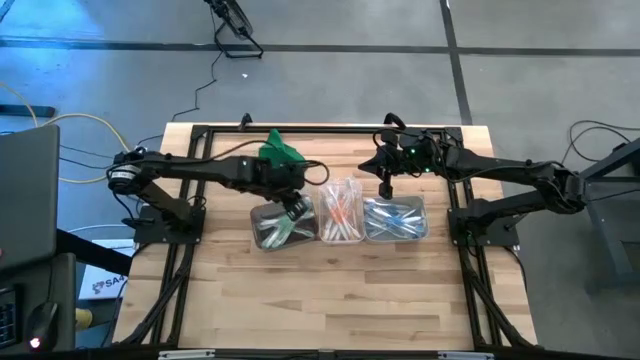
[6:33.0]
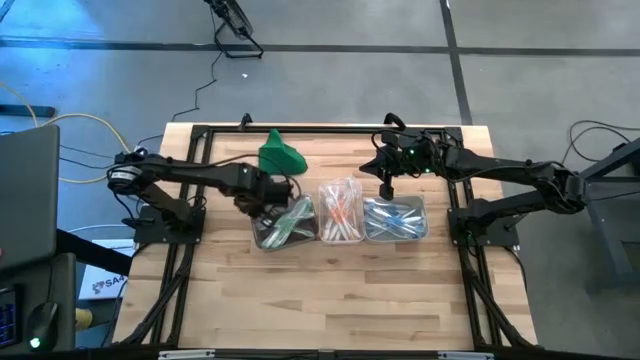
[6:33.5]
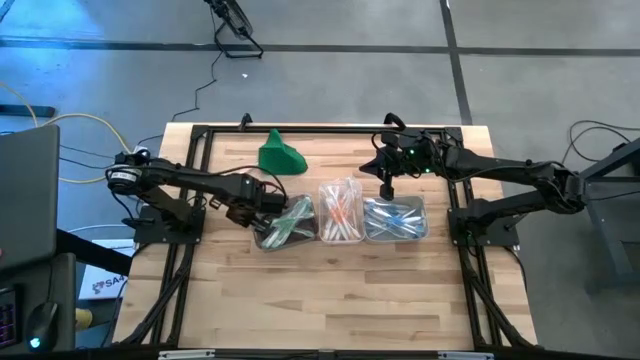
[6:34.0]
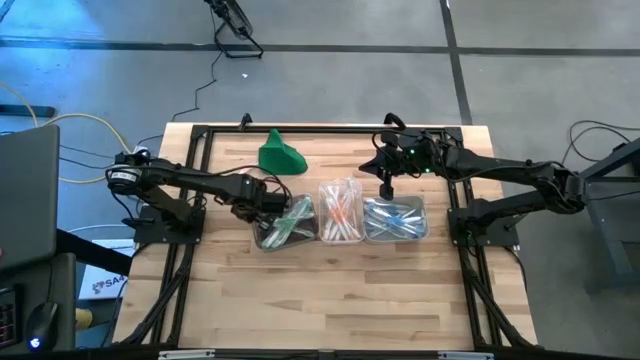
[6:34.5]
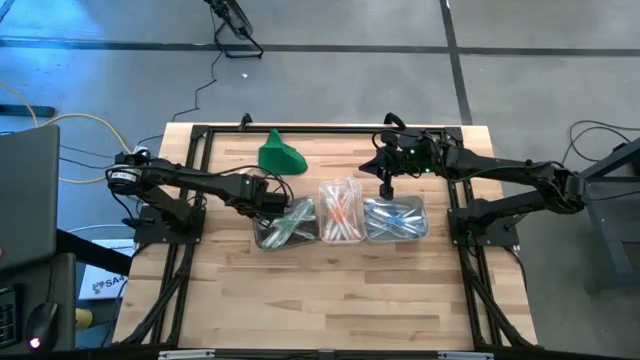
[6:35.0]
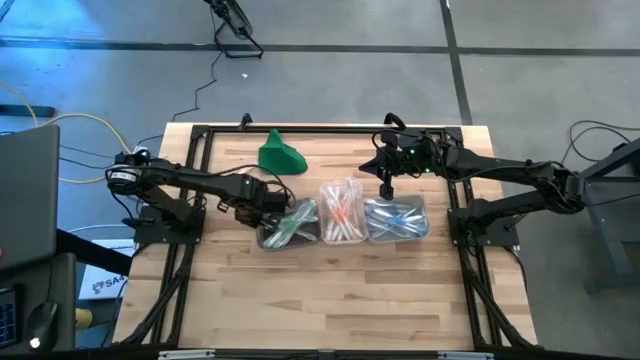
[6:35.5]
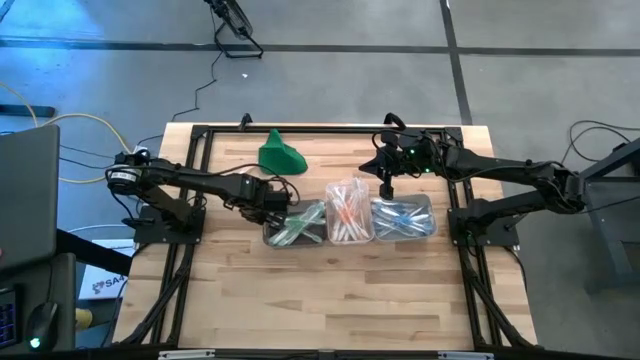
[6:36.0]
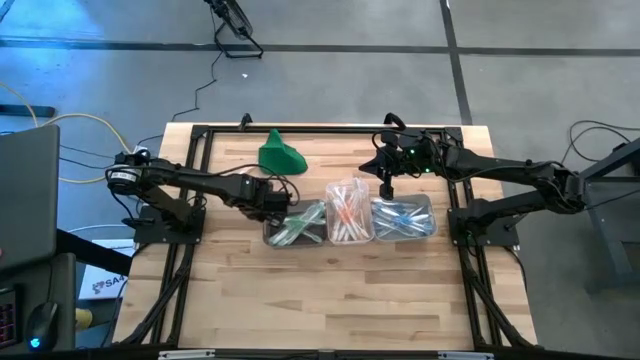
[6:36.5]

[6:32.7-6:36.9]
Task: Pick & Place Toothbrushes
Adjust the black bin on the table

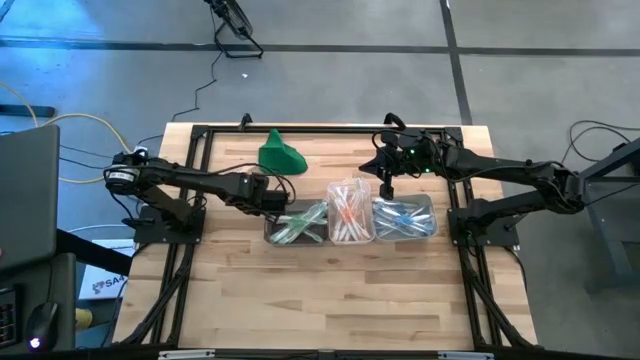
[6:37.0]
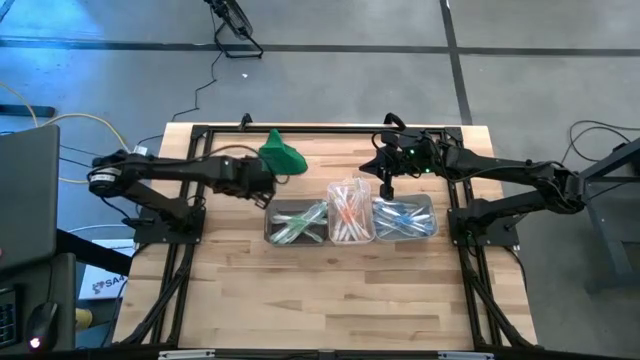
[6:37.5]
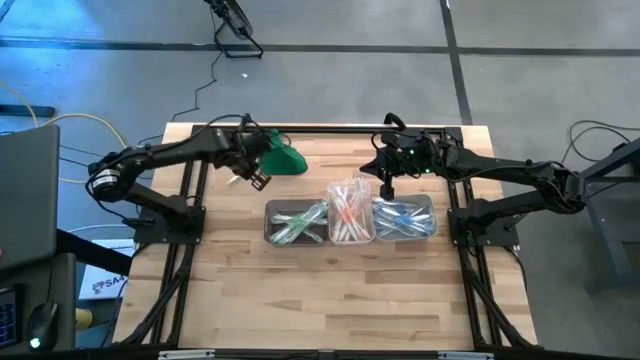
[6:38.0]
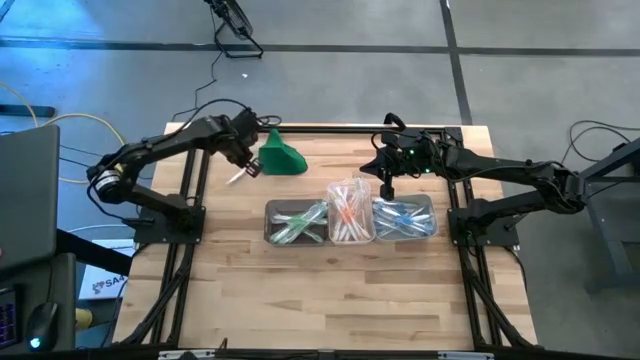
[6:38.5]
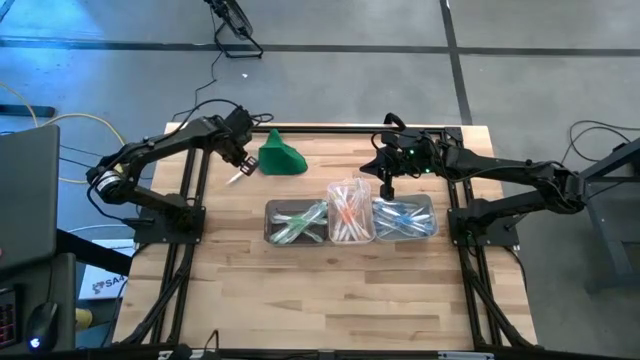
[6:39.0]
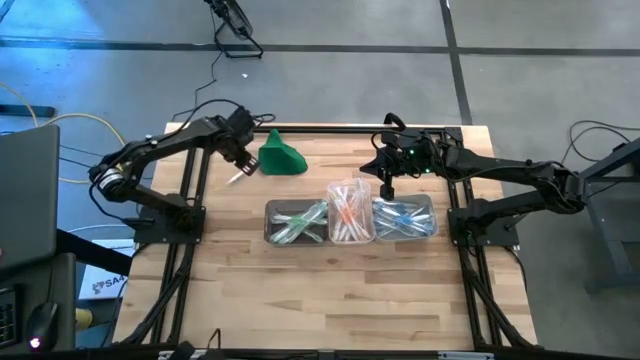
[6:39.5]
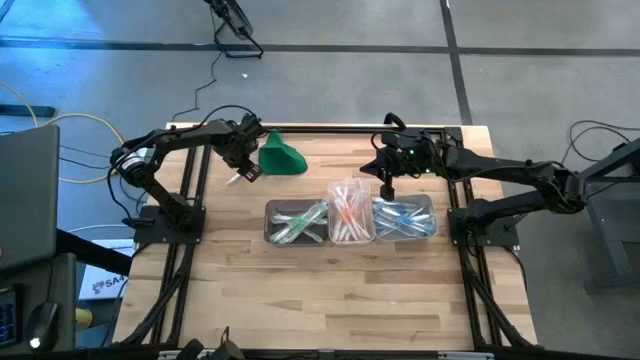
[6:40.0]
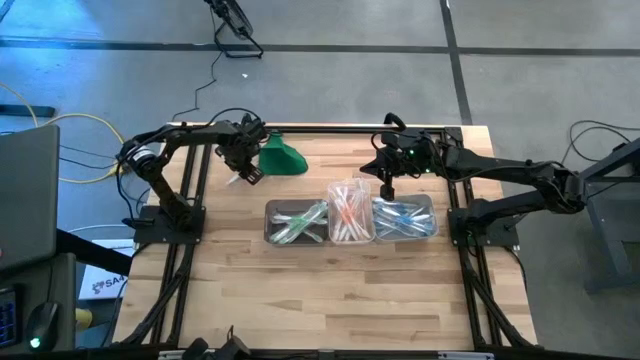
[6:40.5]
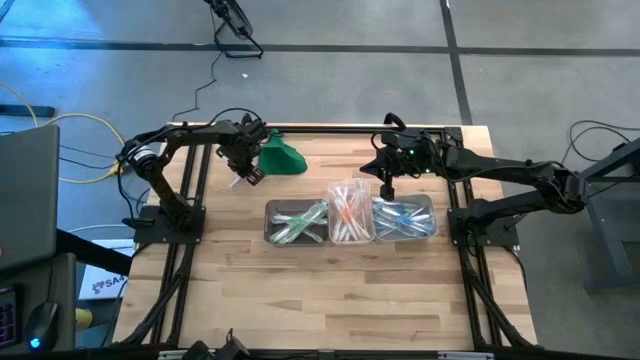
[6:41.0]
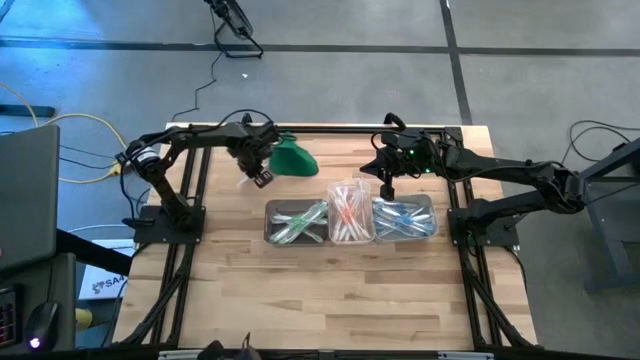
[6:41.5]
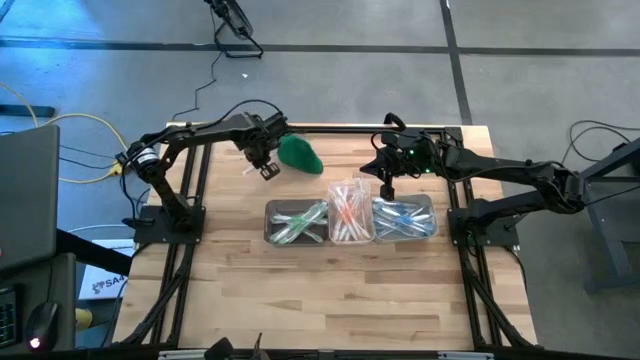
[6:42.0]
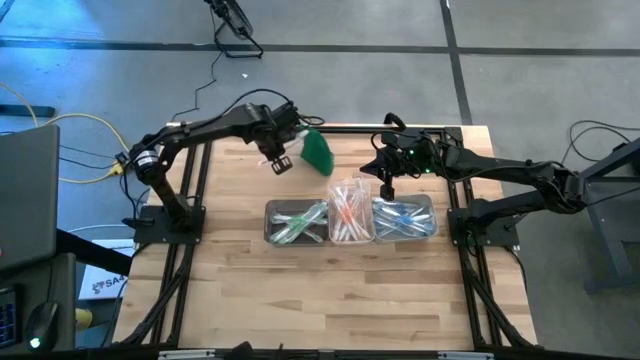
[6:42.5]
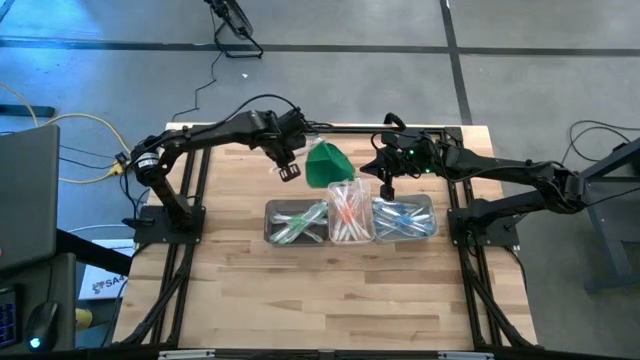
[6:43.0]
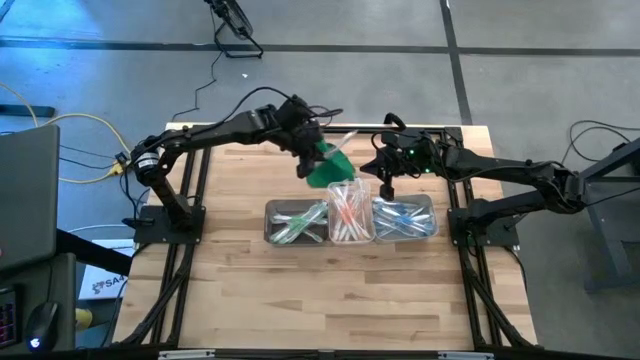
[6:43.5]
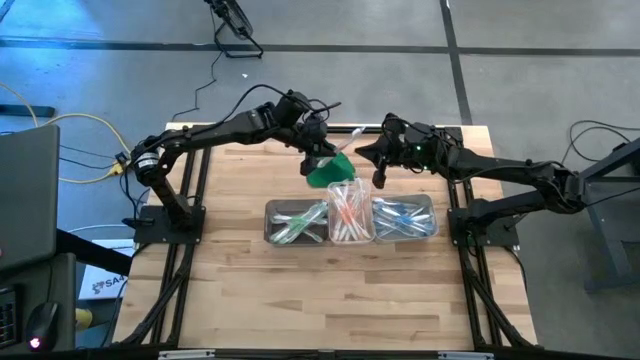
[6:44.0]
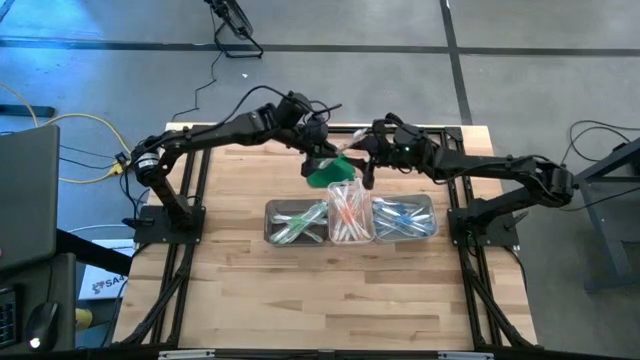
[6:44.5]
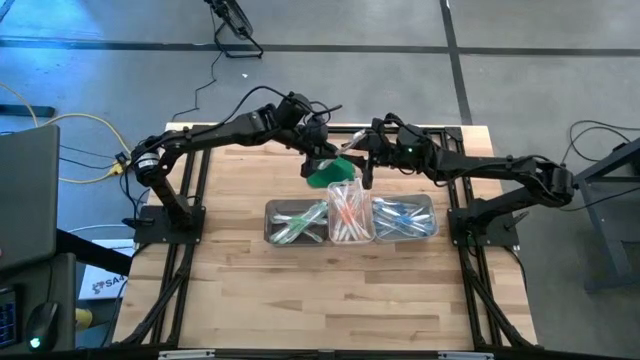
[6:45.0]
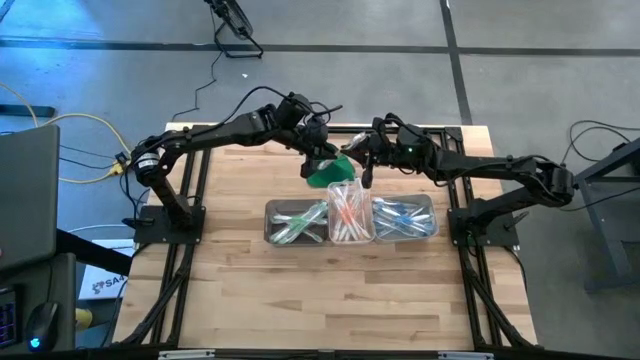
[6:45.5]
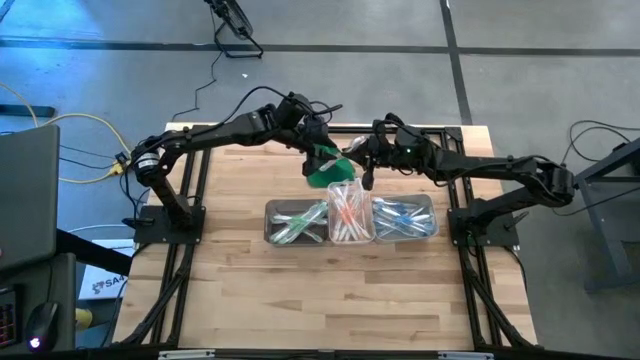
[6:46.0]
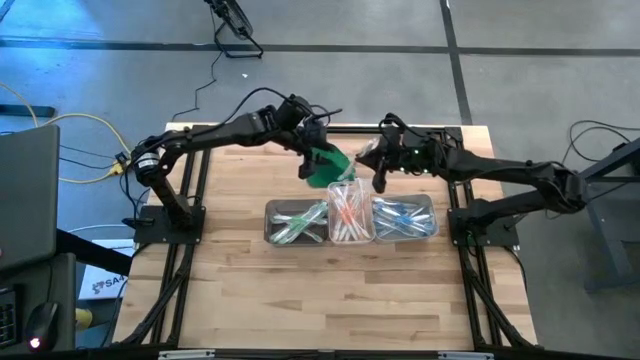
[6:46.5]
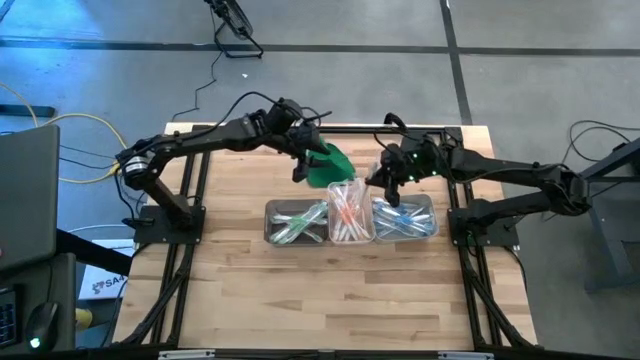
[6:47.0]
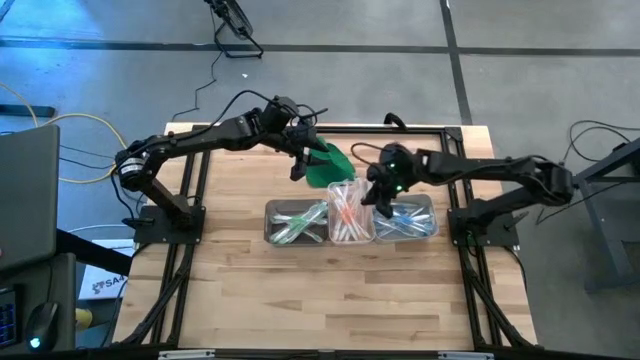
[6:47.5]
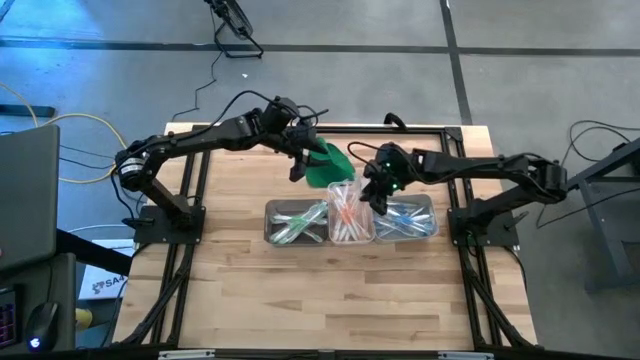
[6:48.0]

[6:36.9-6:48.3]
Put the orange toothbrush into the transparent bin

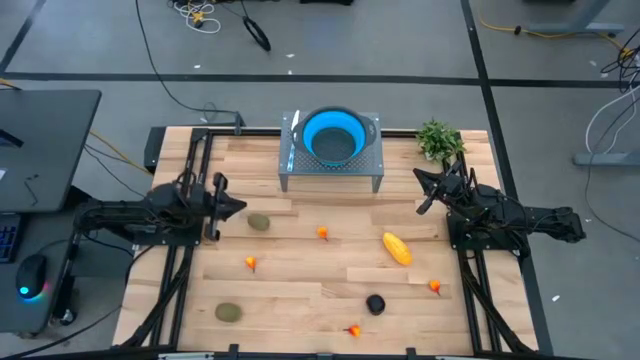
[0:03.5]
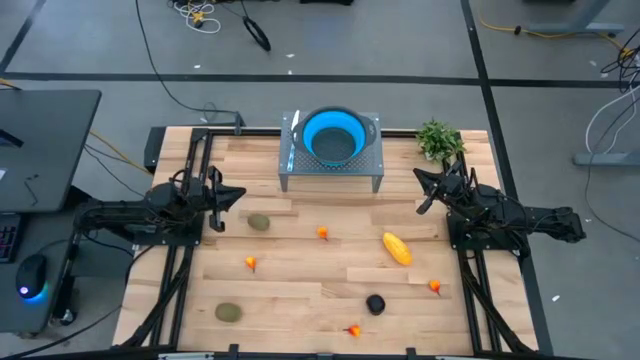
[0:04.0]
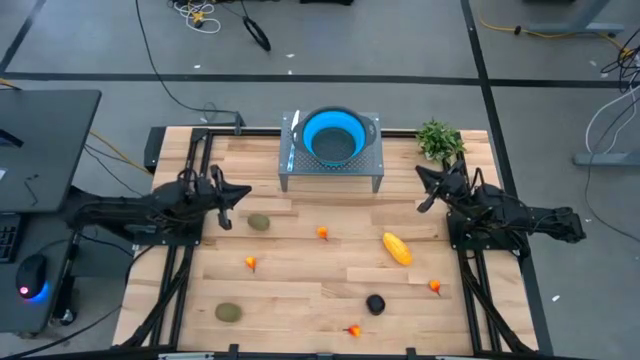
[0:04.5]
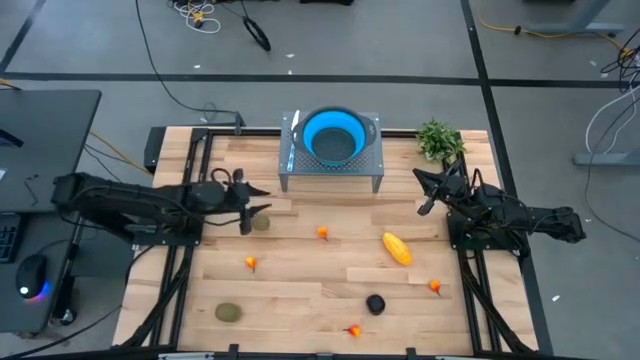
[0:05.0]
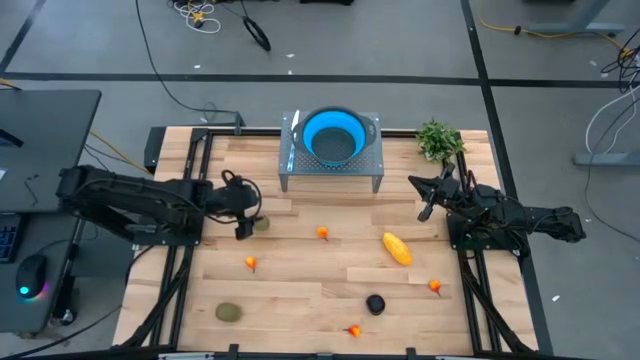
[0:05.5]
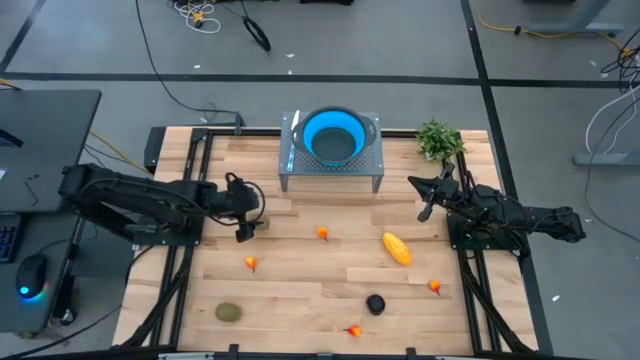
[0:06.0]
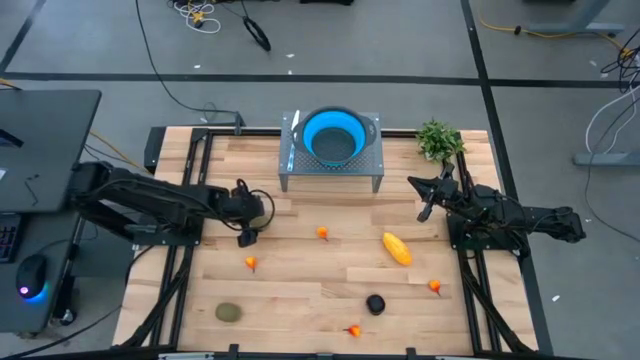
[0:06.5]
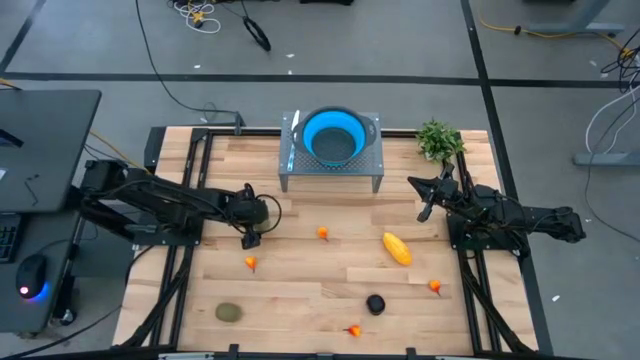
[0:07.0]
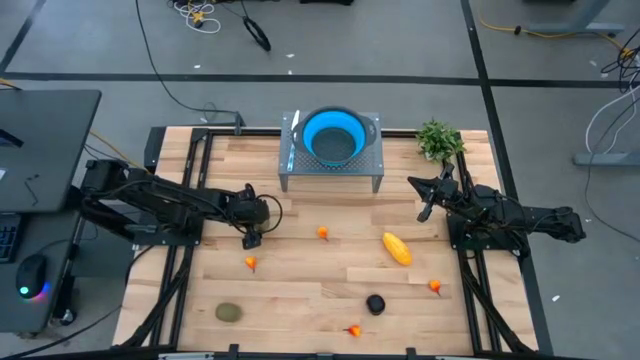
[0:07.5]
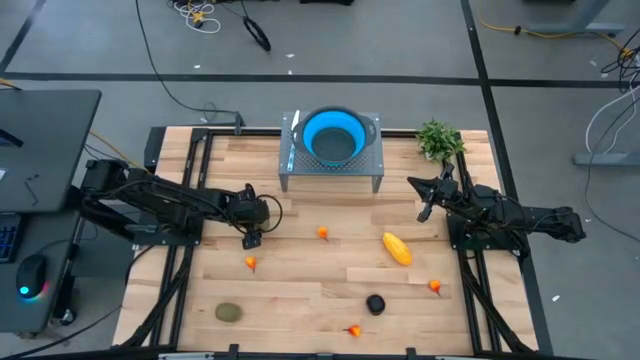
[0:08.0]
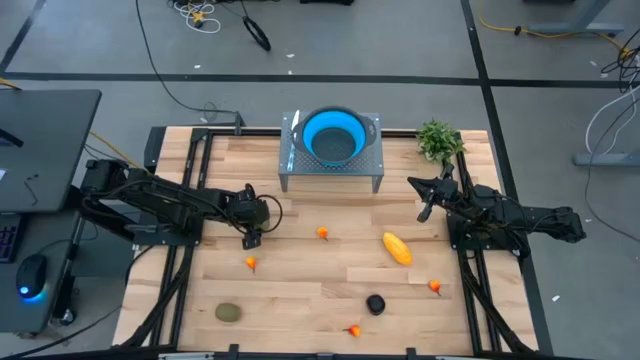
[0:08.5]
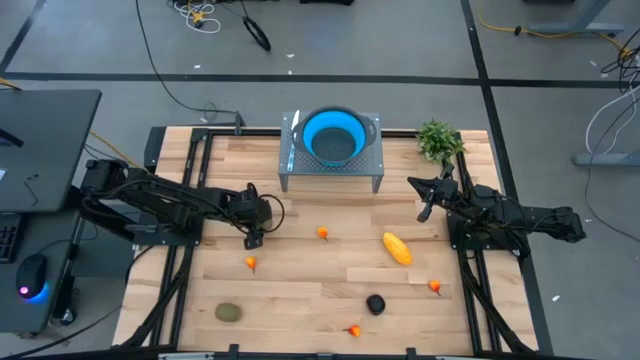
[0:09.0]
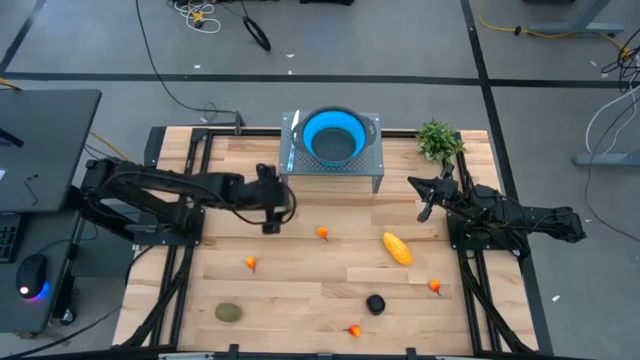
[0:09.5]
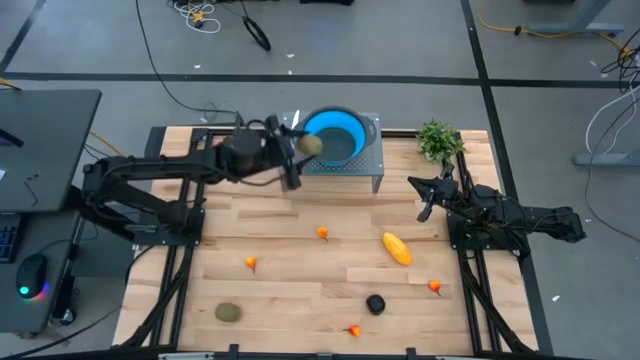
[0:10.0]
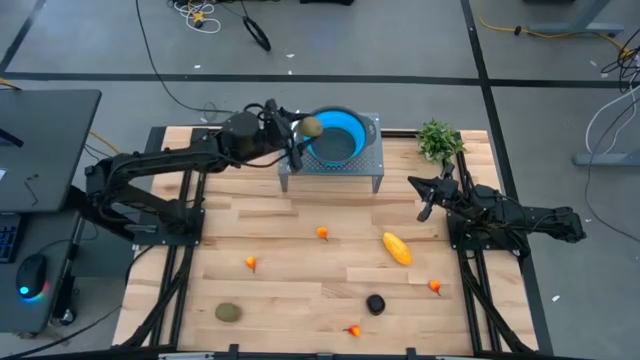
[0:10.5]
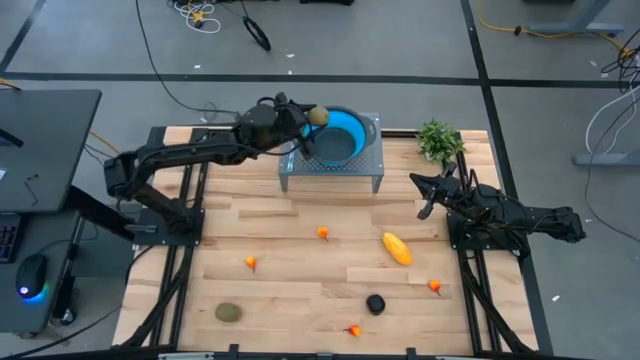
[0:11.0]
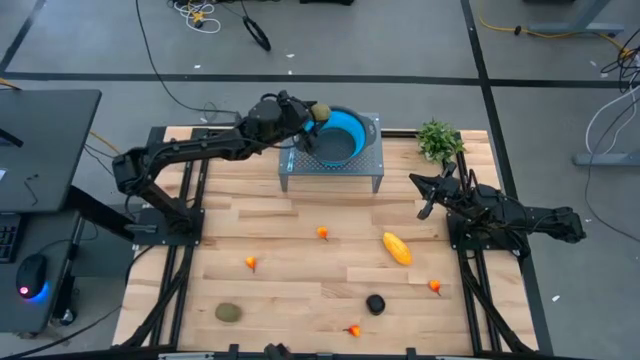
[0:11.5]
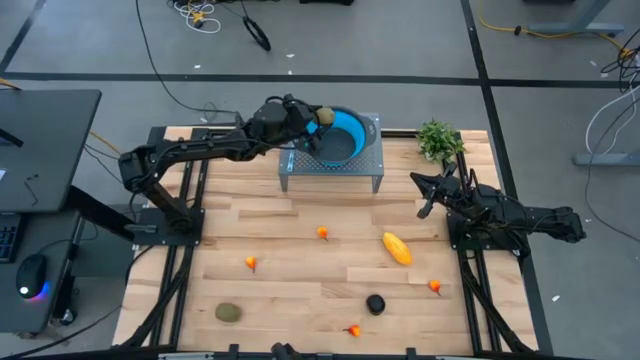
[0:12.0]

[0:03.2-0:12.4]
Task: Pick & Place Fruit
Put the brown kiwi into the blue strainer bowl
